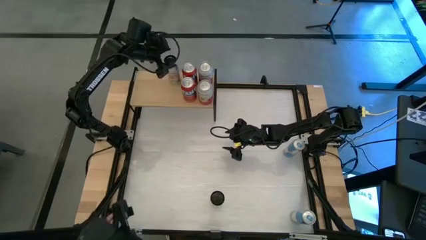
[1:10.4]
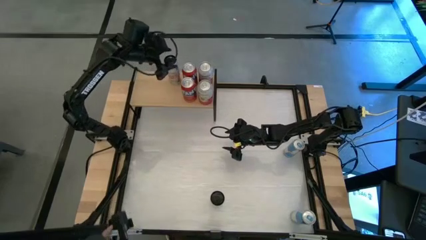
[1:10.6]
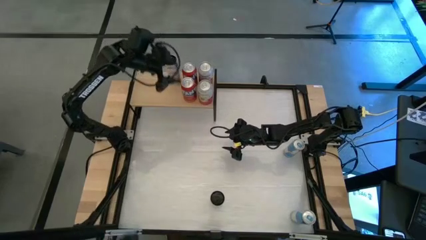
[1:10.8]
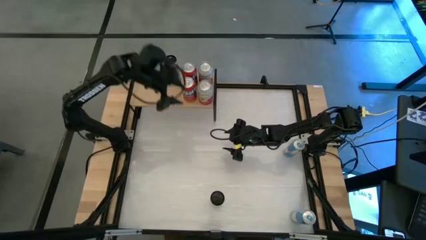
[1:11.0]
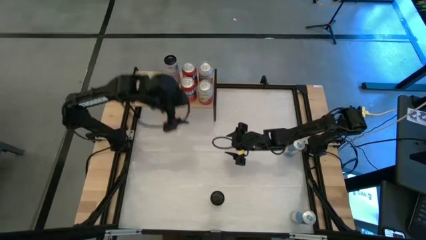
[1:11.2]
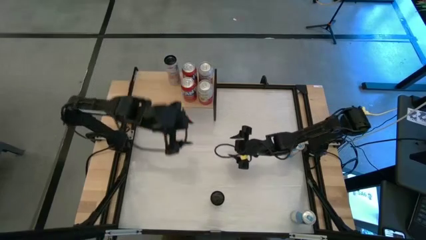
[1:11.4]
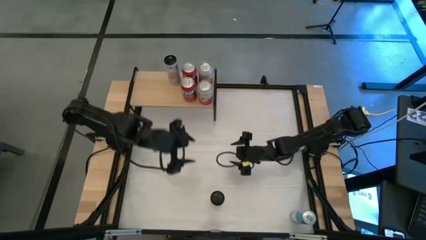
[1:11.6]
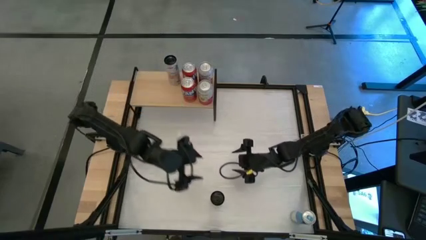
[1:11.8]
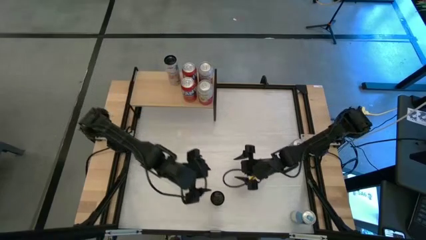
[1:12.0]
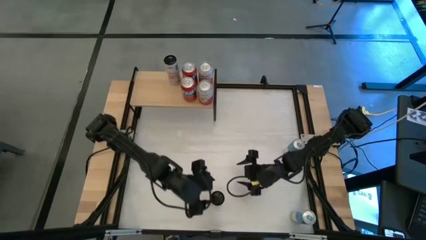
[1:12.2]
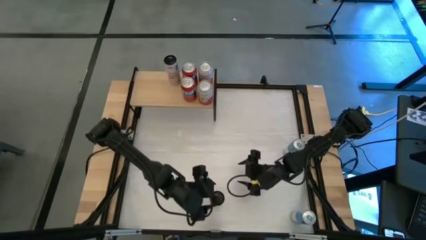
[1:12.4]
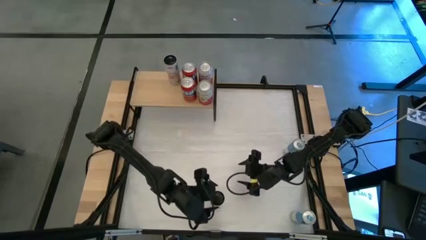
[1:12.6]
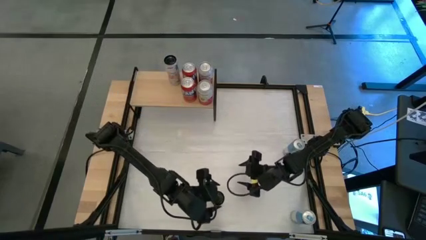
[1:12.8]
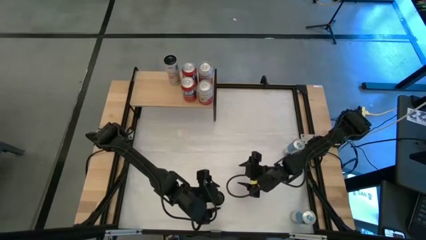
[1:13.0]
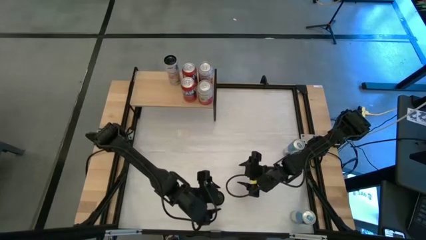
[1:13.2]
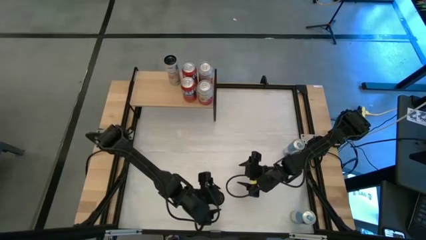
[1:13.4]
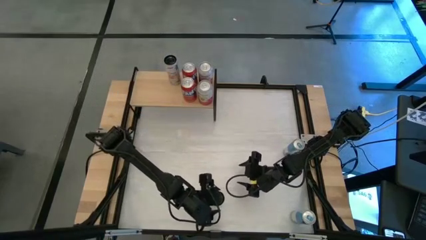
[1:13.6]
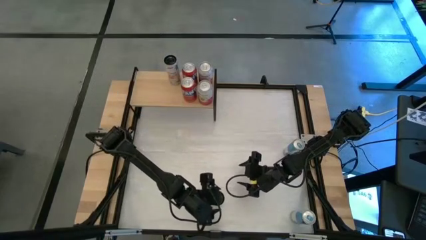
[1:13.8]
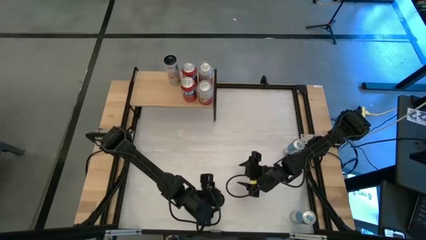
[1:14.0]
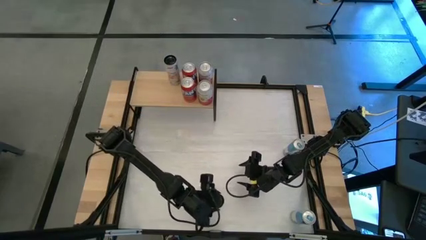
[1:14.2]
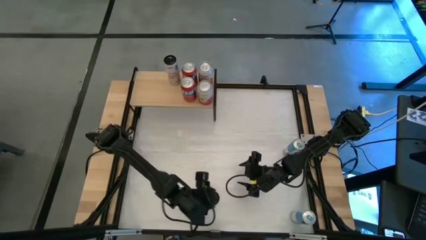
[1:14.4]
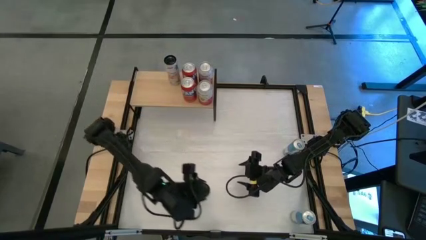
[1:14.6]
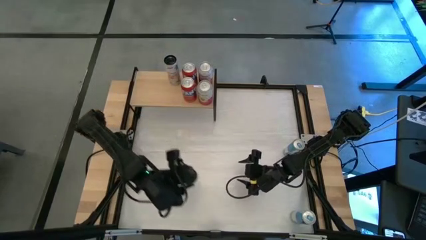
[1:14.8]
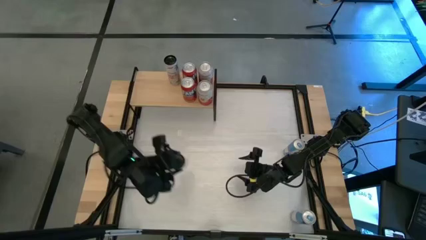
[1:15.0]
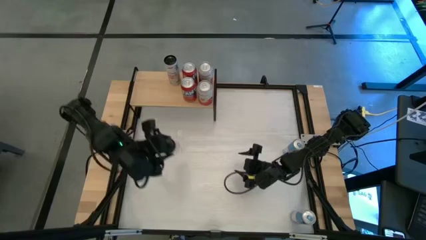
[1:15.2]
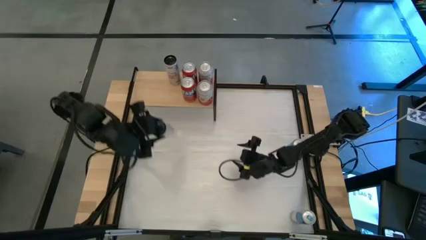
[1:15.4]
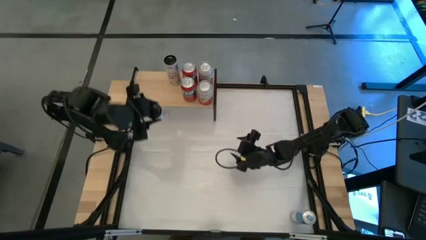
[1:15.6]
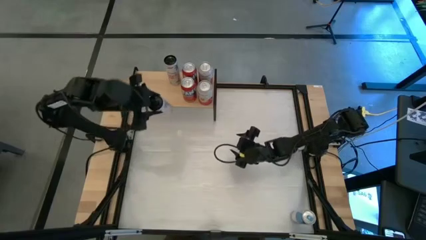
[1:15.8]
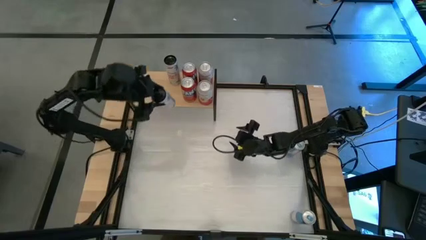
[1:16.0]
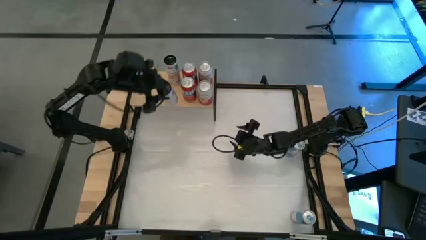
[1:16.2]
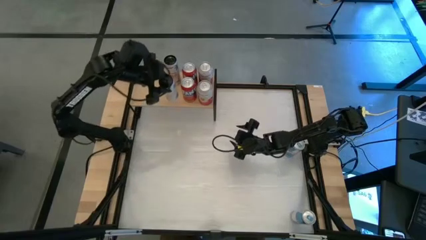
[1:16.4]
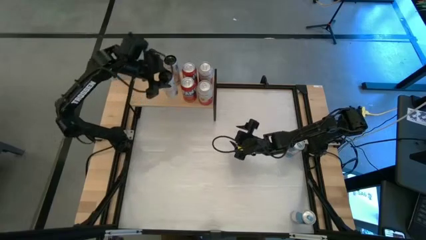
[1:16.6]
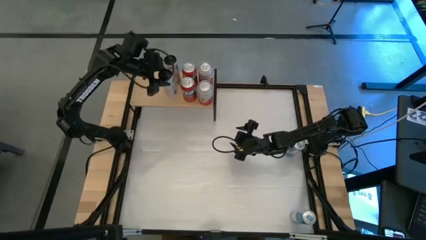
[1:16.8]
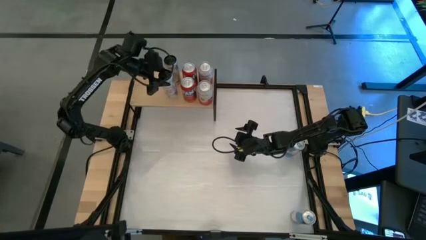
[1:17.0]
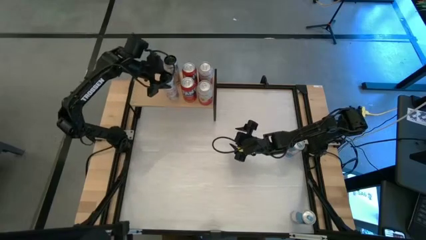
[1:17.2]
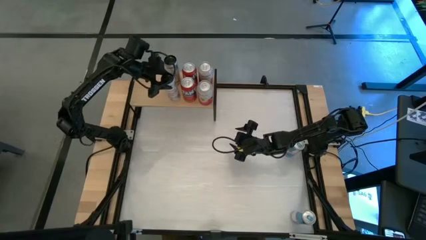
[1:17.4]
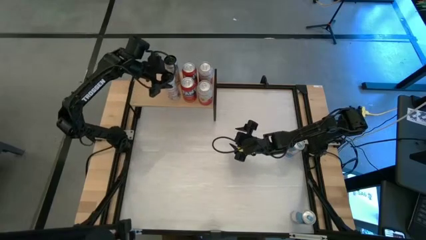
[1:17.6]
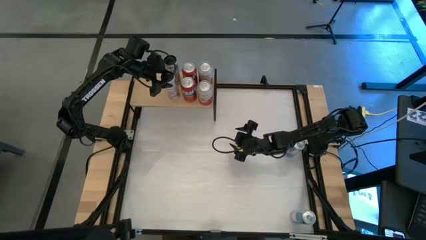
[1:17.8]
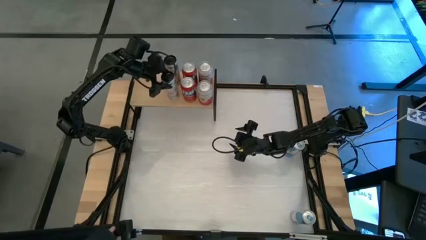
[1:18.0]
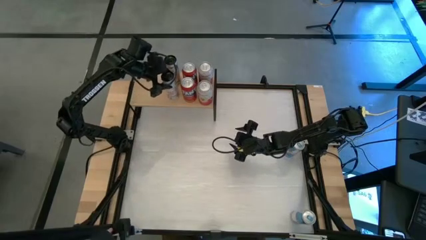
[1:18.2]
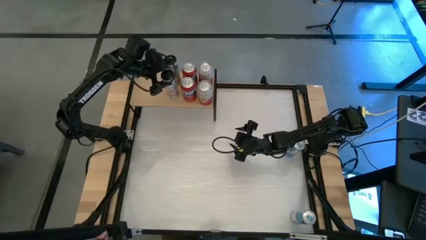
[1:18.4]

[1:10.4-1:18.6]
Task: Place canned beverage on shelf
Put the white soda can on the shelf aligned with the other white soda can

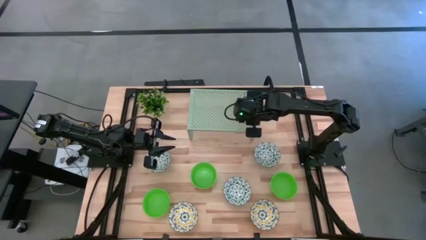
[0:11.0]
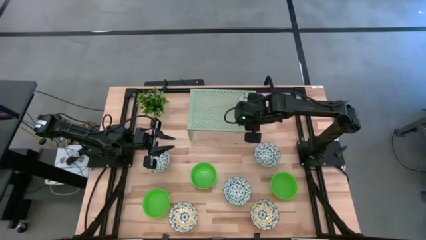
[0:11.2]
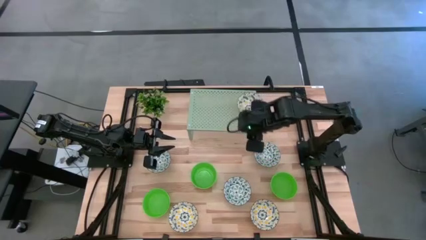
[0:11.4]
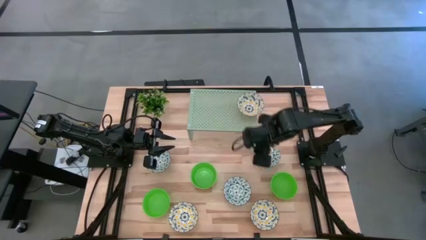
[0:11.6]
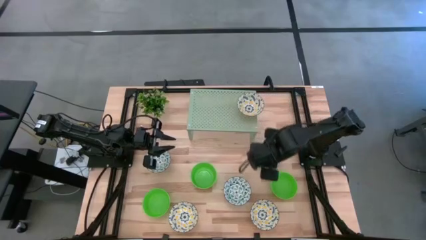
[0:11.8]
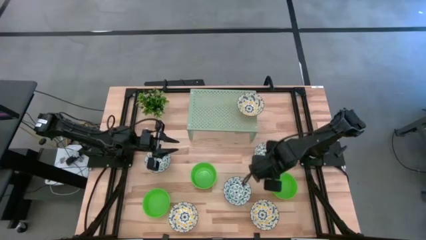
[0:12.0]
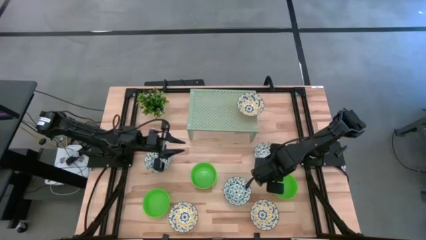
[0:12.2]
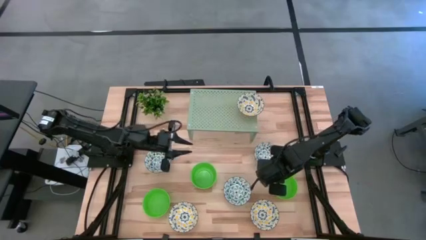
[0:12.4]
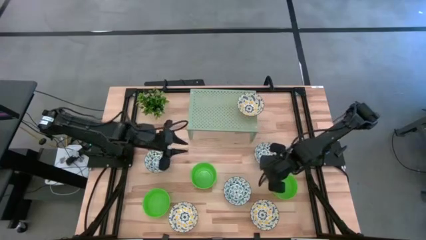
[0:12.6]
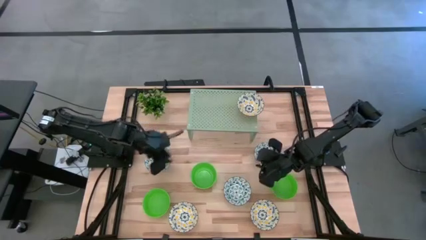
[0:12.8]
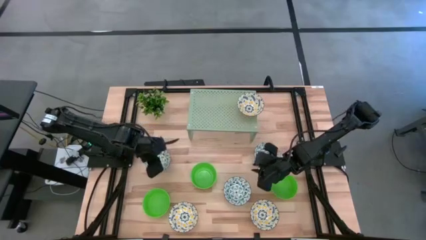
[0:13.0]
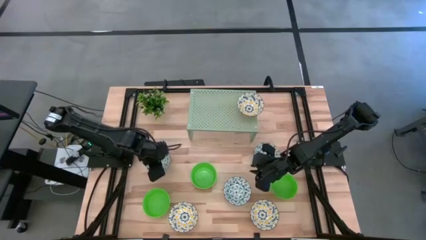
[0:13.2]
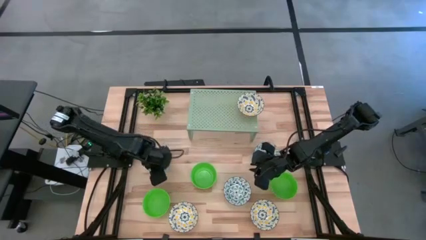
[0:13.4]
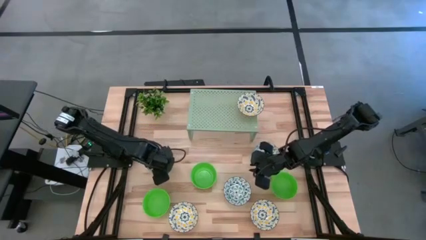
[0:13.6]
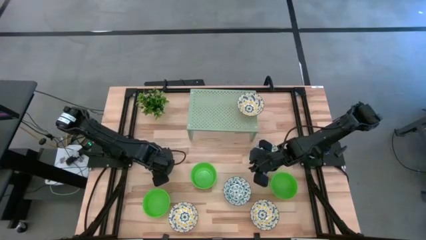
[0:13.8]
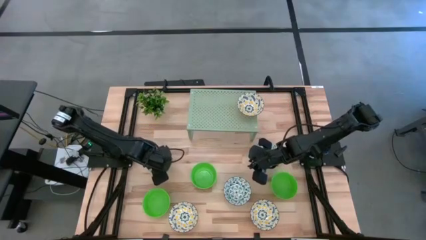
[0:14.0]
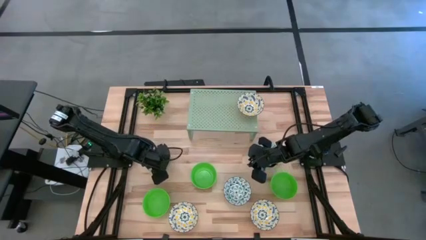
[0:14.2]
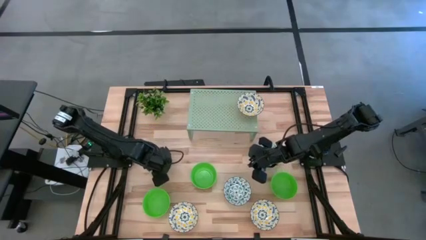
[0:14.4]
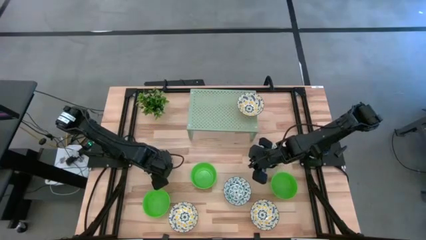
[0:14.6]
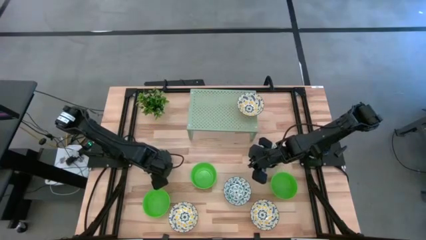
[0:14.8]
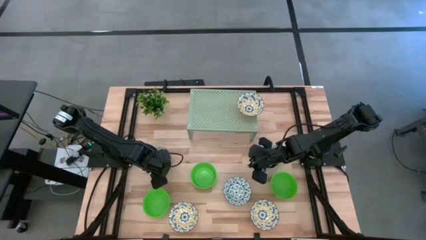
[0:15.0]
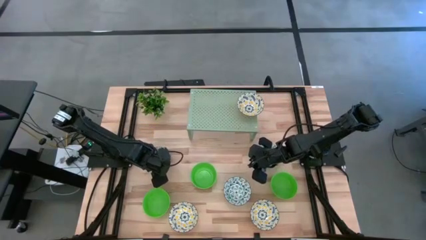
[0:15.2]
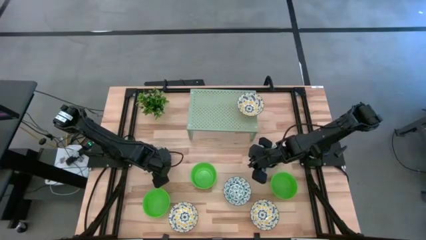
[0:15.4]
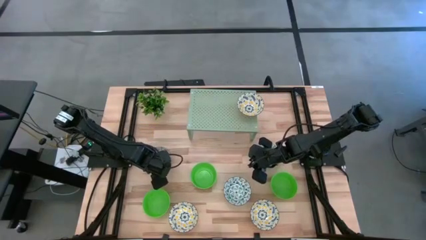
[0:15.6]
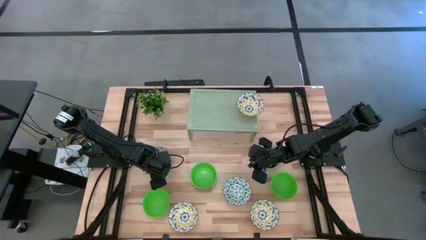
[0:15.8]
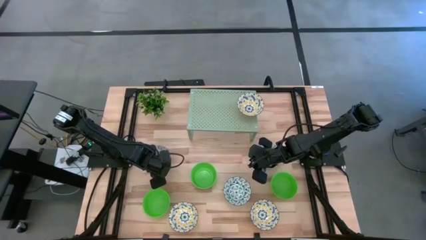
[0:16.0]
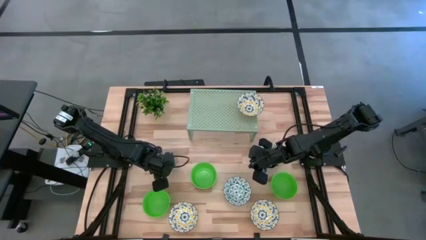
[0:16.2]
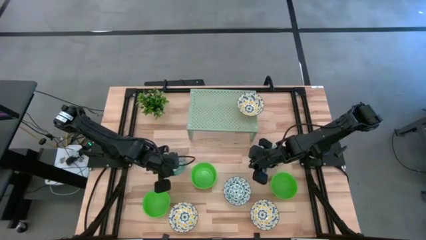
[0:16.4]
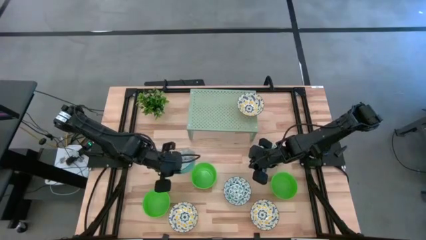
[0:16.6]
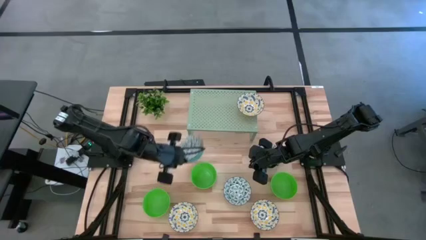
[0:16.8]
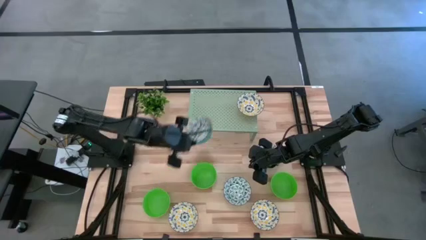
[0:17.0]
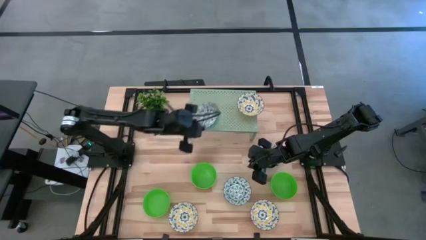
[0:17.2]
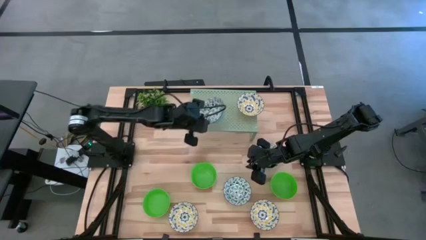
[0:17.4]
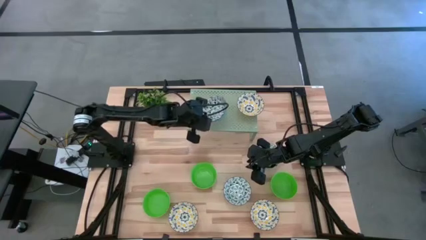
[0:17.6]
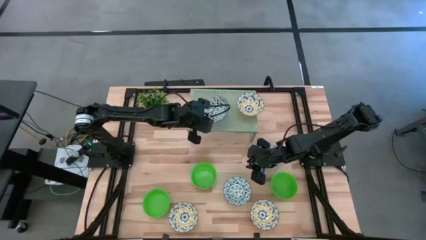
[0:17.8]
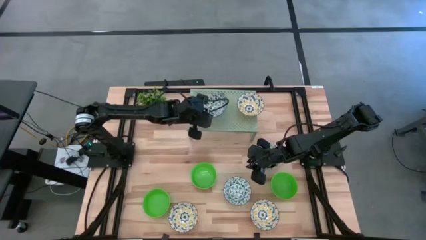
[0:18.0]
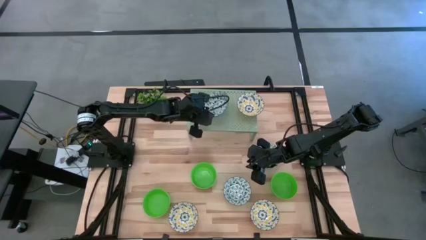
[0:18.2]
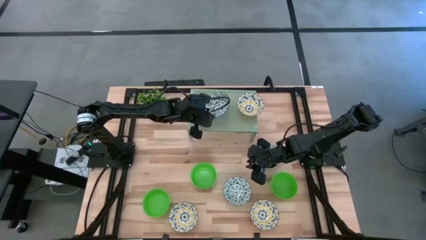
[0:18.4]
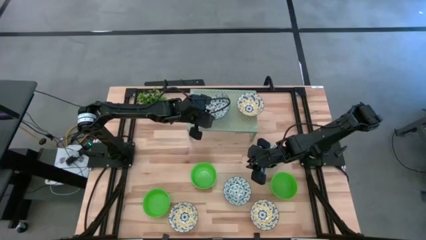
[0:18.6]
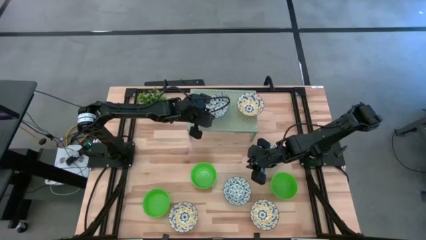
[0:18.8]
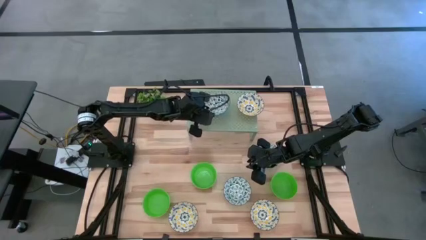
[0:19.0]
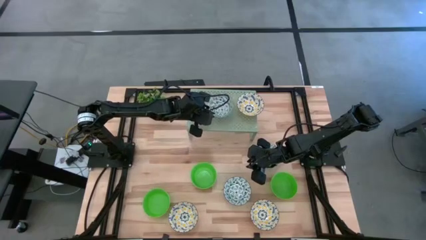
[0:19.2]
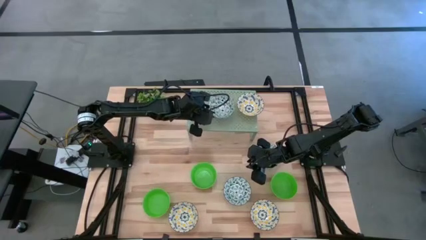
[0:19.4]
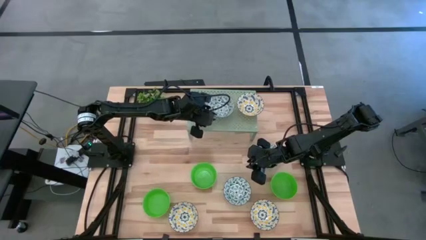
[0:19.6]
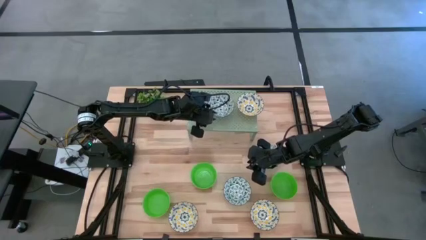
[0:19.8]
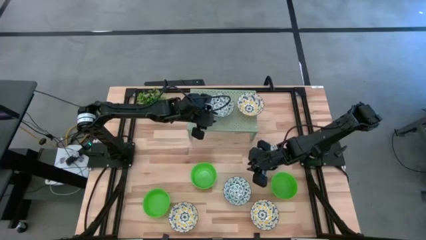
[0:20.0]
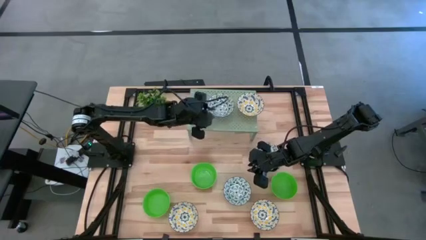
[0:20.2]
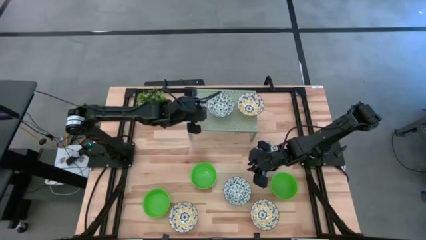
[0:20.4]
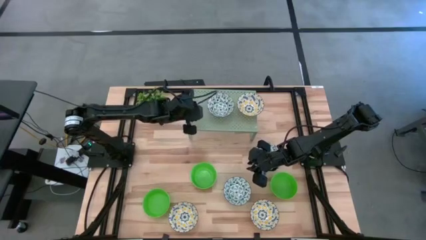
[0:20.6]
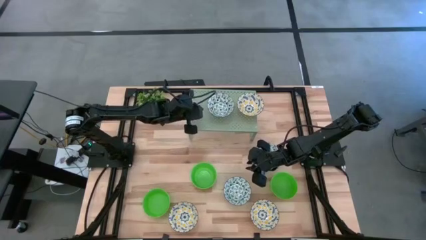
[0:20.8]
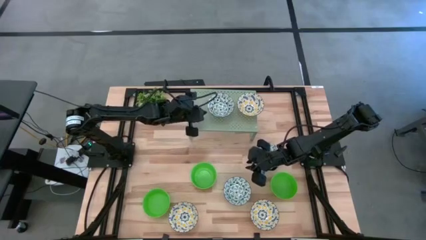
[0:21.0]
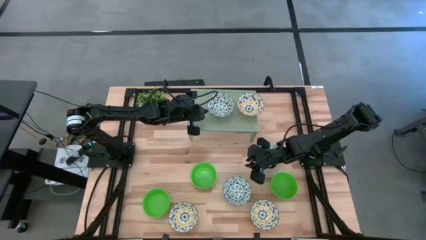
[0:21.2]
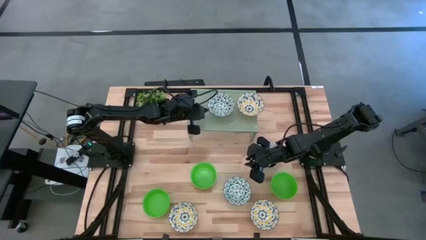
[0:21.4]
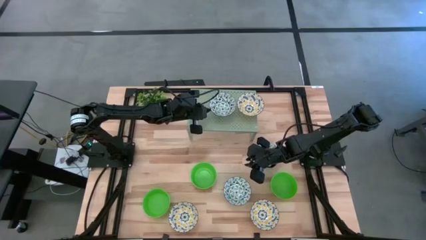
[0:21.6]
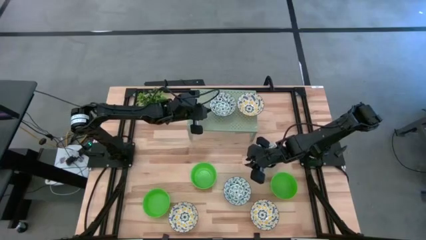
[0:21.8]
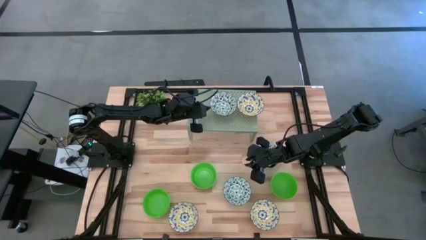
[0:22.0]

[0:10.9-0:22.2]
Task: Pick & Place Mini bowls
Put the top left blue bowl on the shelf
